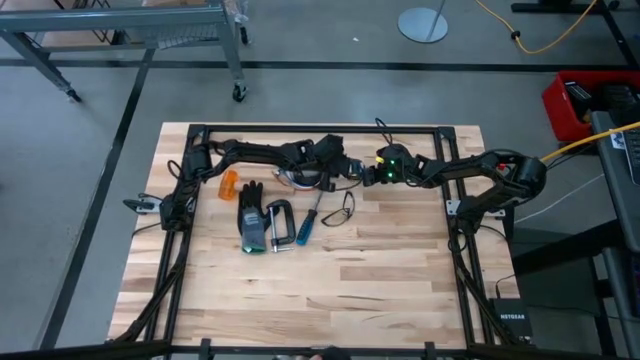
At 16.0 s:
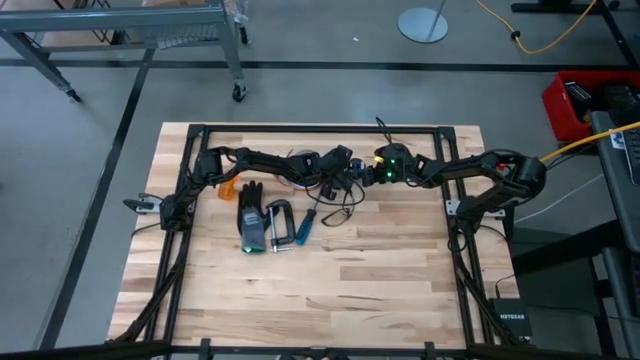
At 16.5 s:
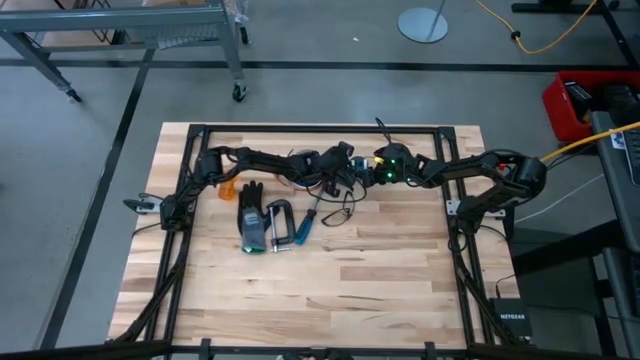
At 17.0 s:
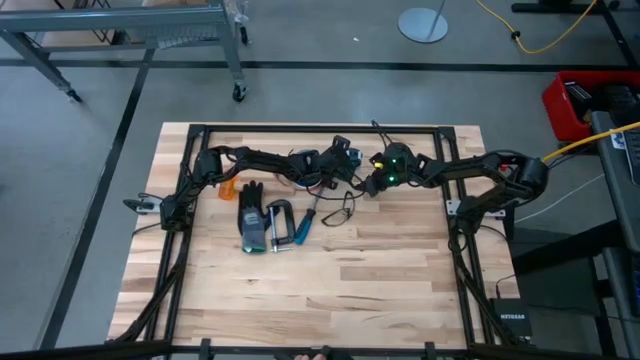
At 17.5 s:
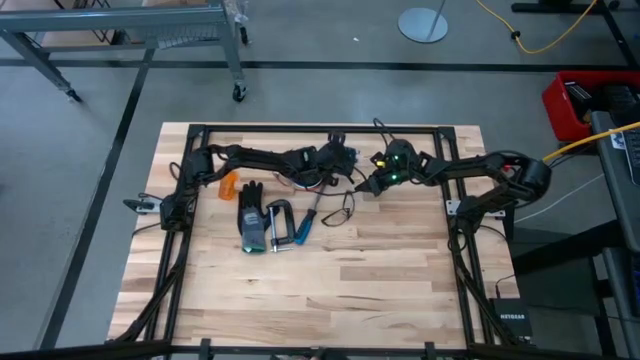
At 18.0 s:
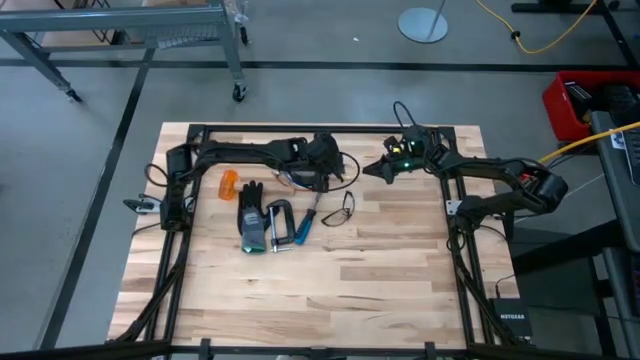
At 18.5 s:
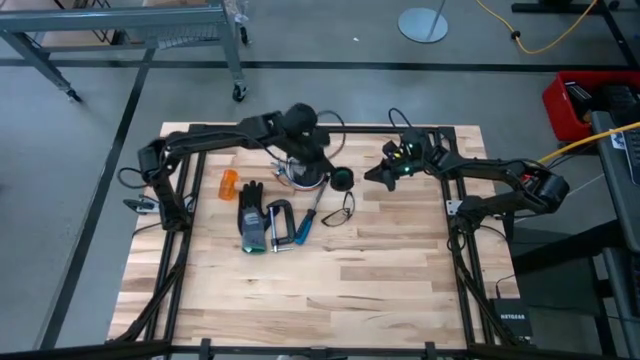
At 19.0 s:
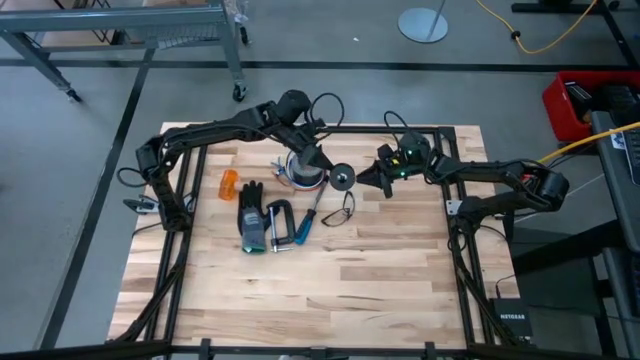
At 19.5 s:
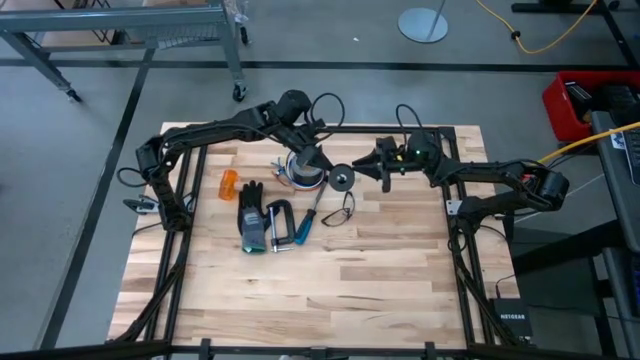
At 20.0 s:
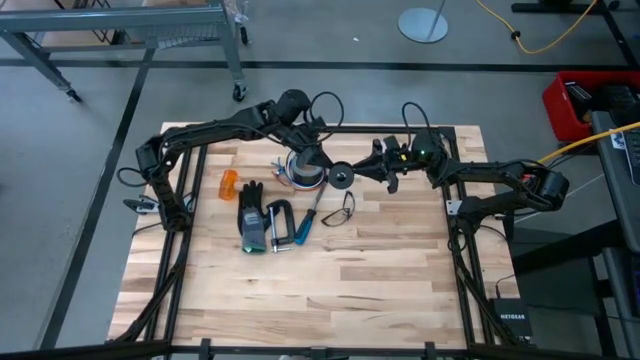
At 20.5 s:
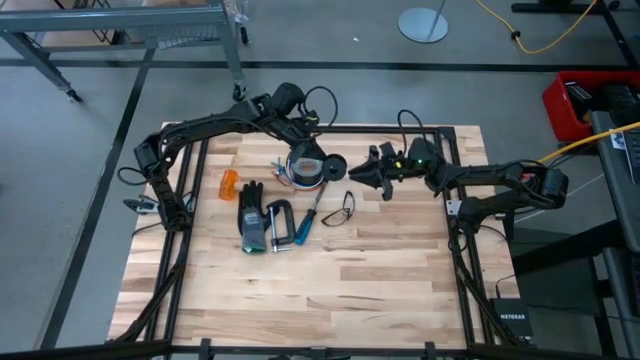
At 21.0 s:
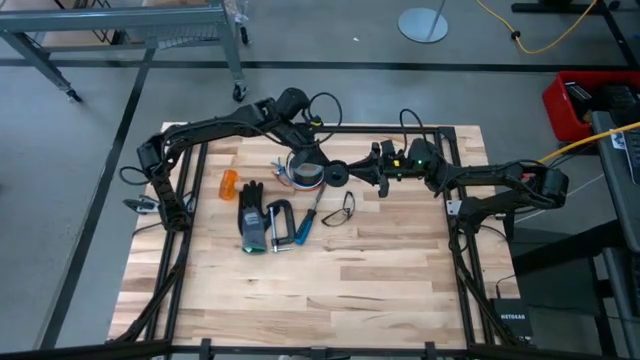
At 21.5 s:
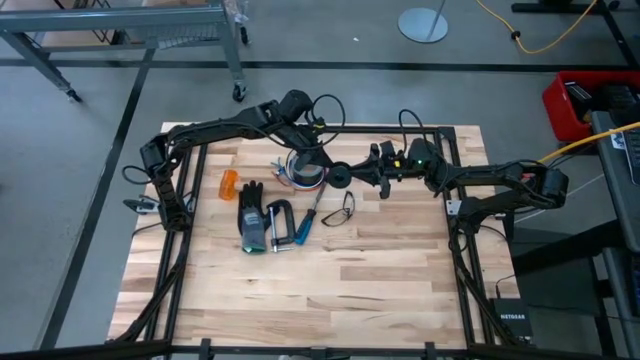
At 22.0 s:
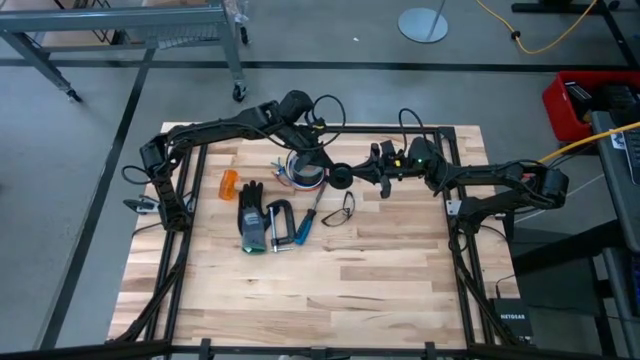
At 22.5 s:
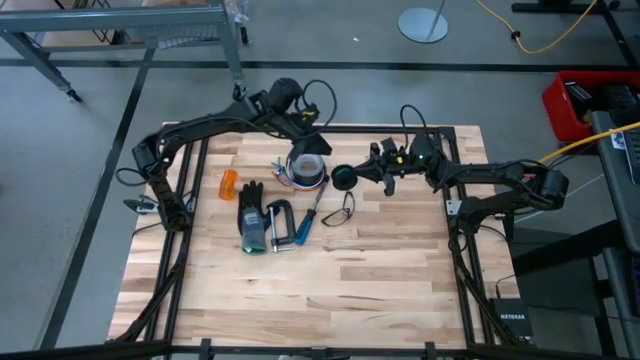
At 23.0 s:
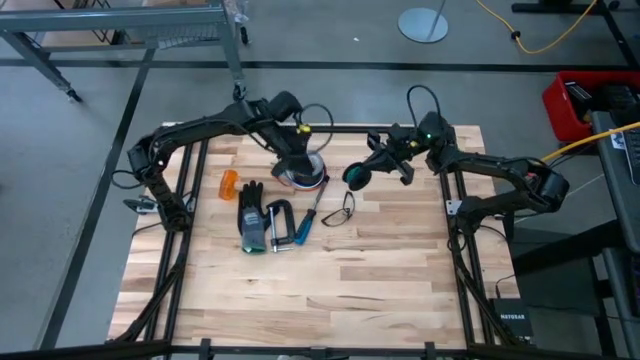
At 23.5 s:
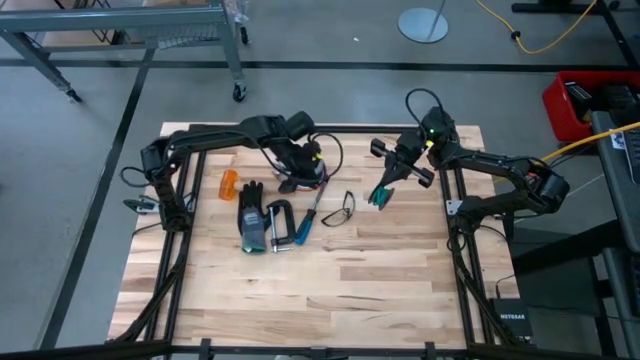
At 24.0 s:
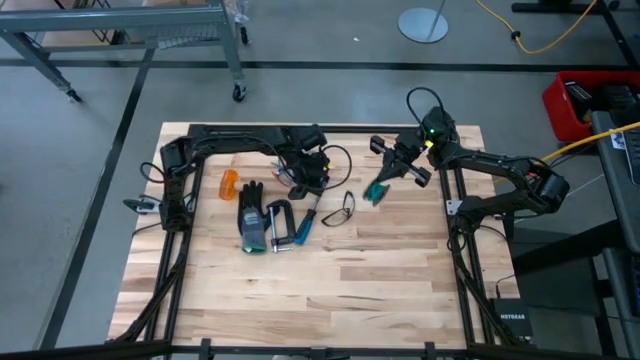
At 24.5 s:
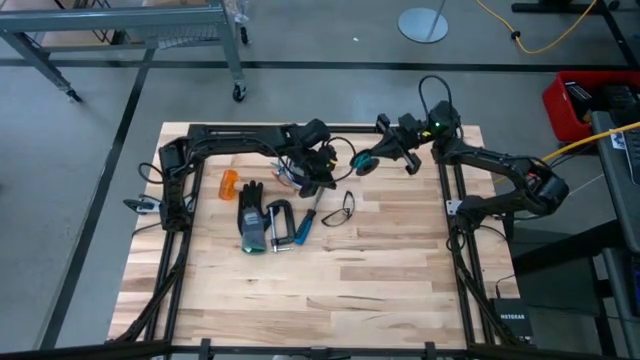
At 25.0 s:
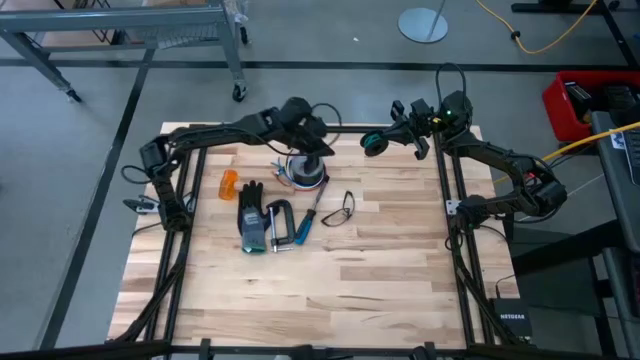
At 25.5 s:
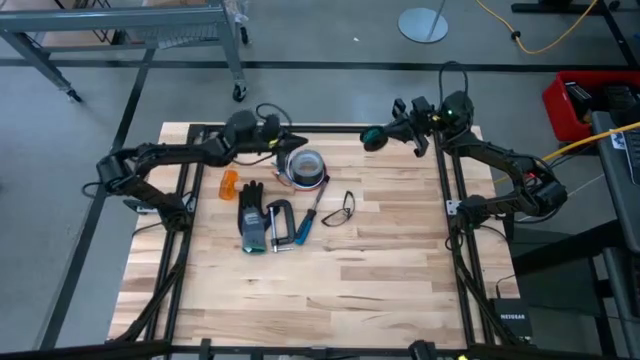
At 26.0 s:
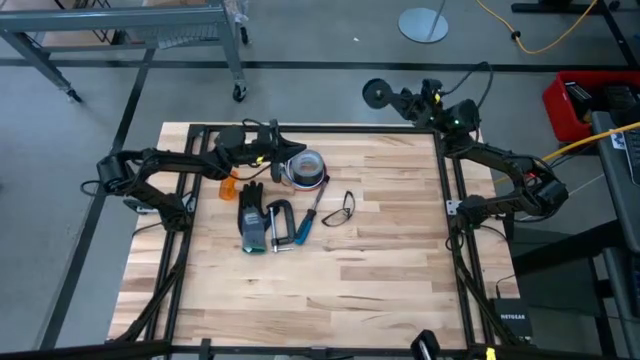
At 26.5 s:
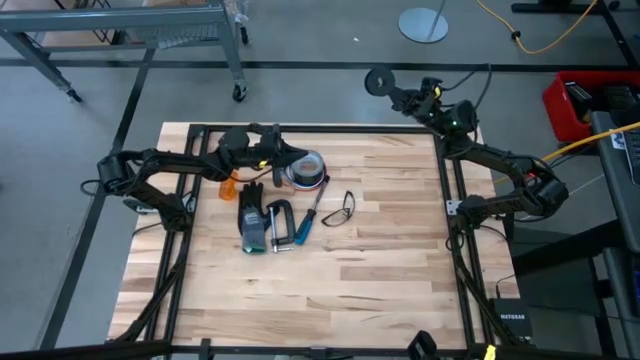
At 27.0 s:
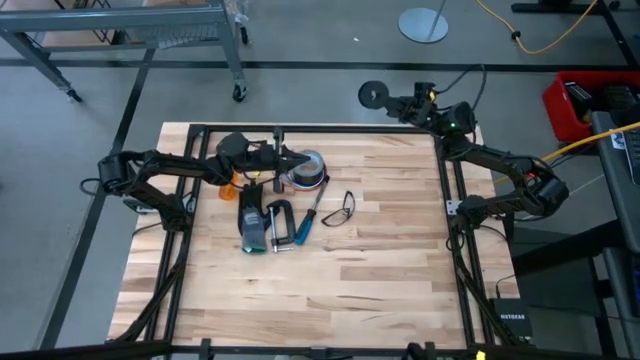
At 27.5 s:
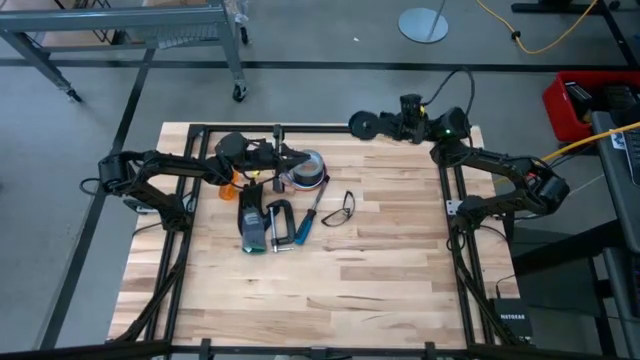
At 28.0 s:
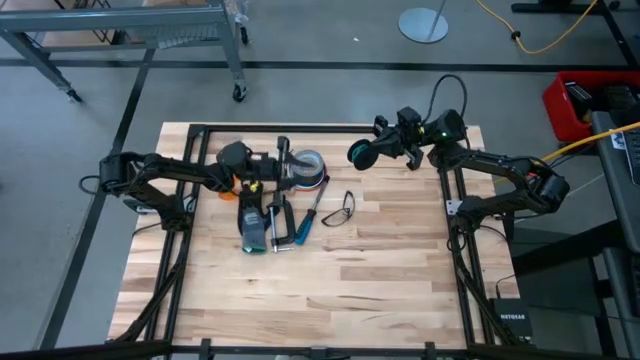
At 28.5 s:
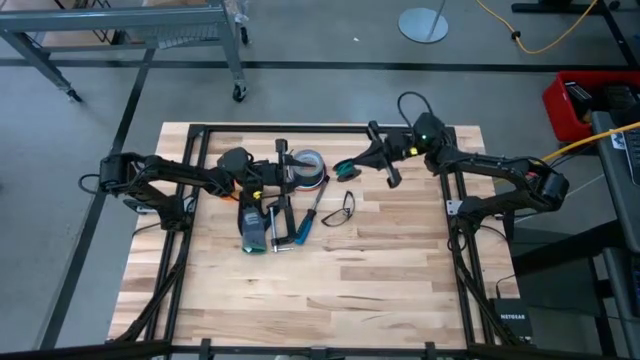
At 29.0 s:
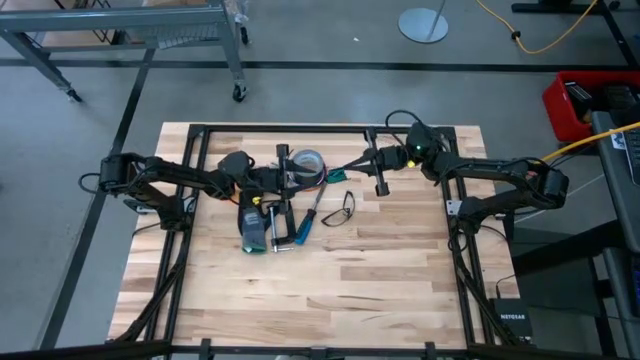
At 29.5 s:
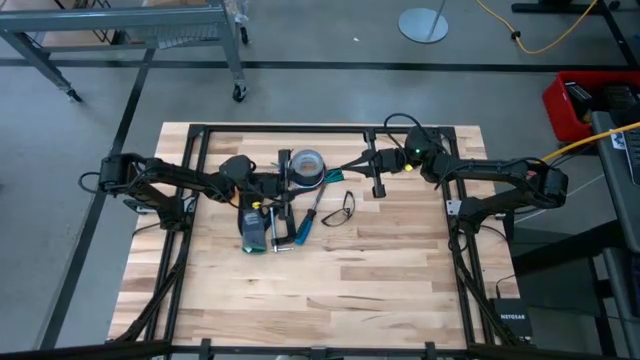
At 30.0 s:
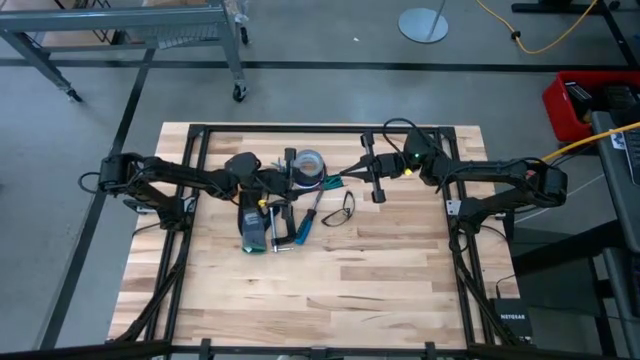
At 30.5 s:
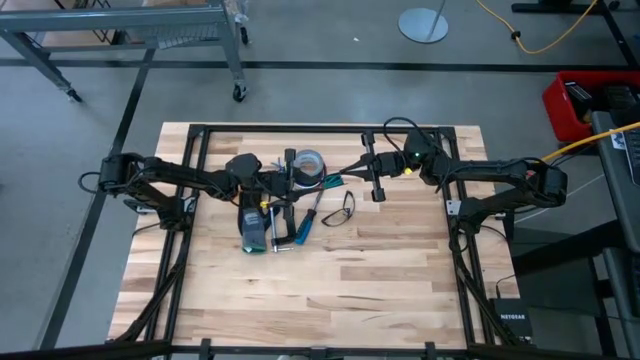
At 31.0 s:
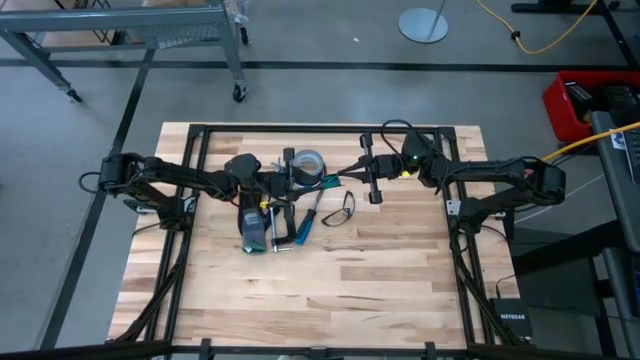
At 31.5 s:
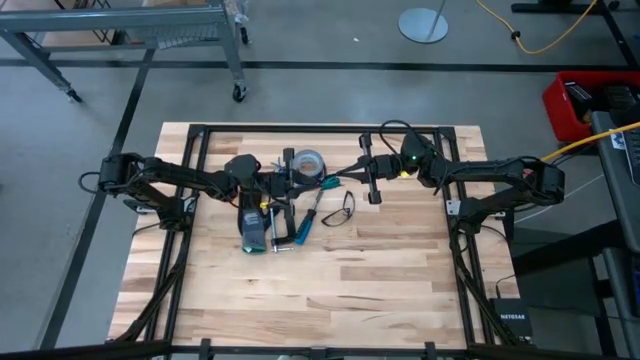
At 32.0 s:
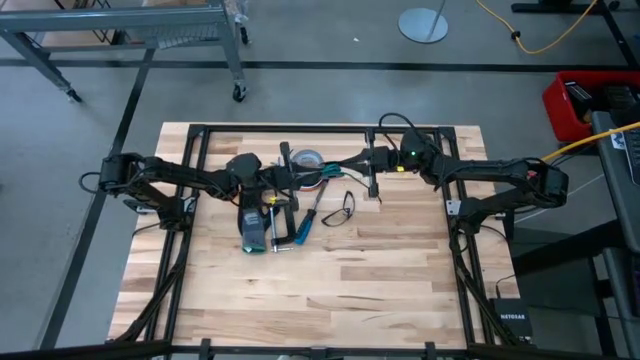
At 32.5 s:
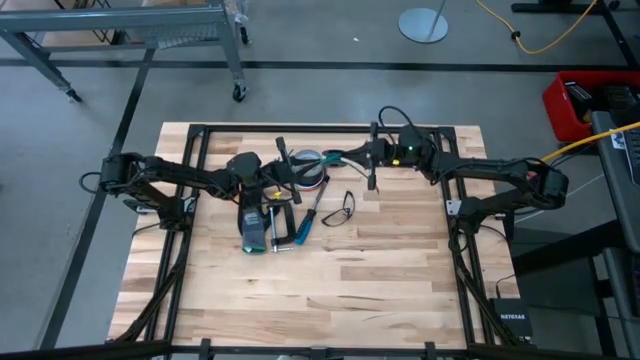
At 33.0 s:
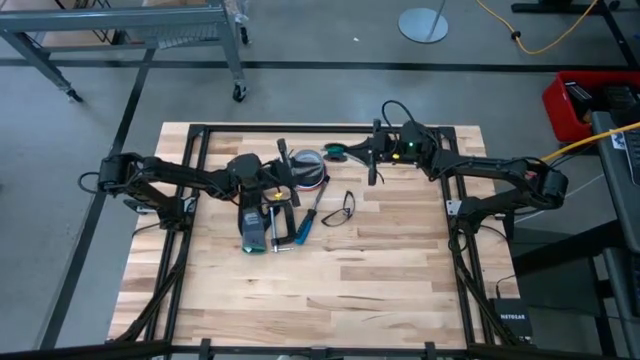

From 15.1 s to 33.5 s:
Task: Coil cords
Uncoil the wire from the cable spool
